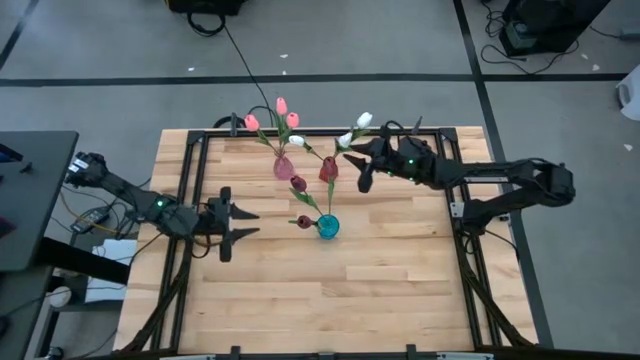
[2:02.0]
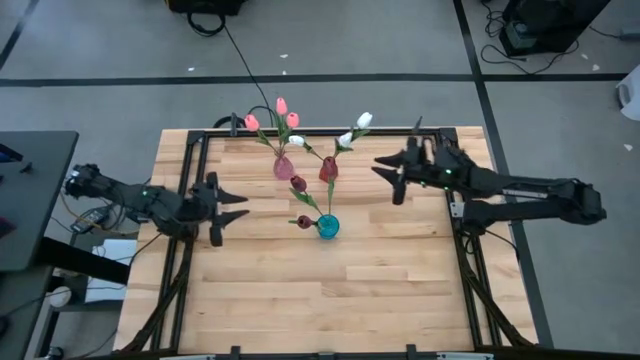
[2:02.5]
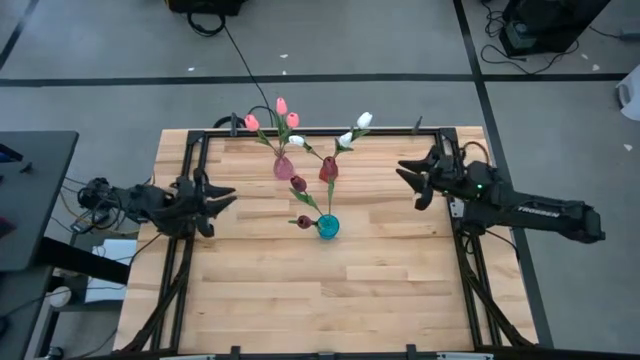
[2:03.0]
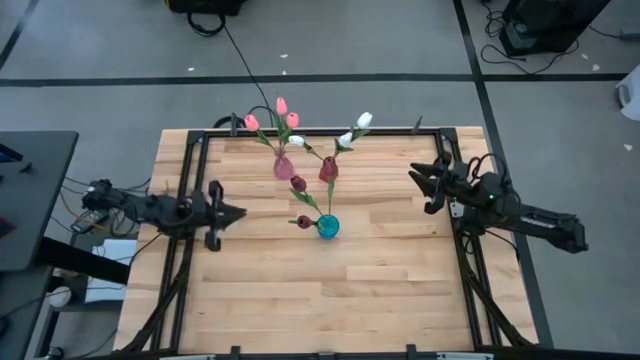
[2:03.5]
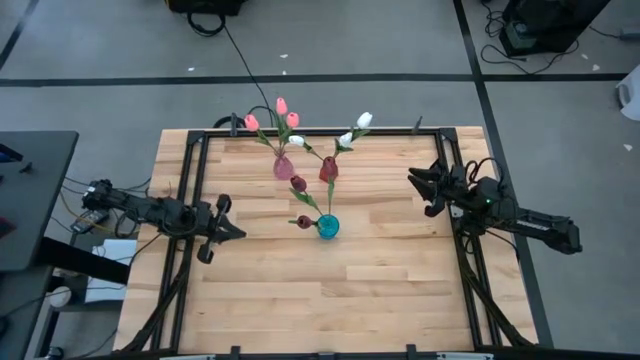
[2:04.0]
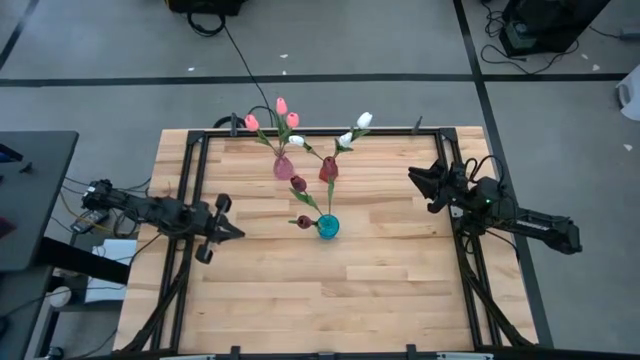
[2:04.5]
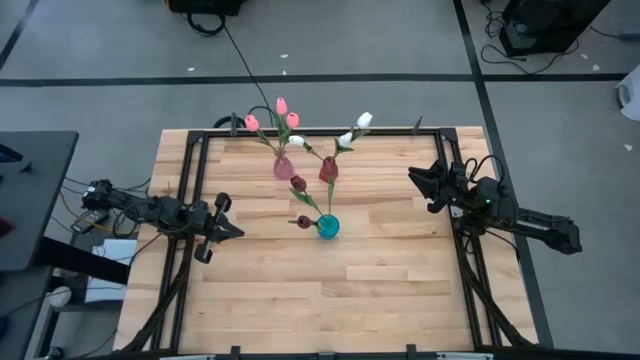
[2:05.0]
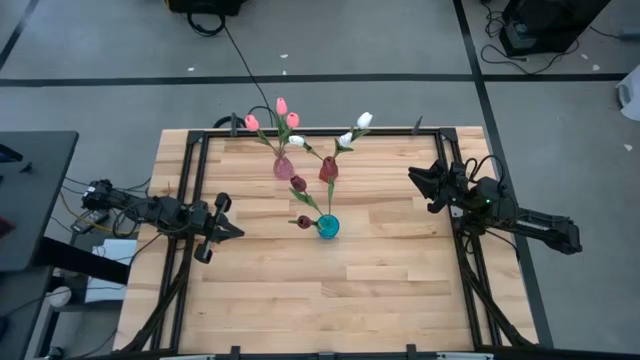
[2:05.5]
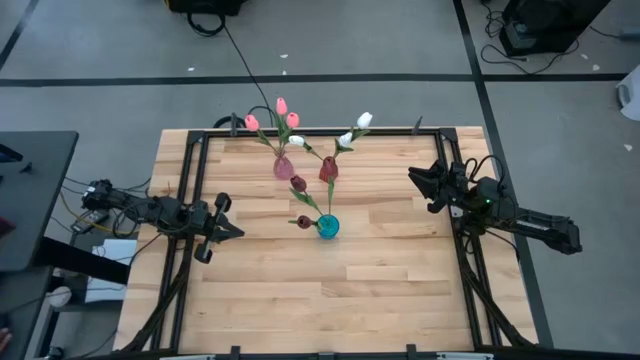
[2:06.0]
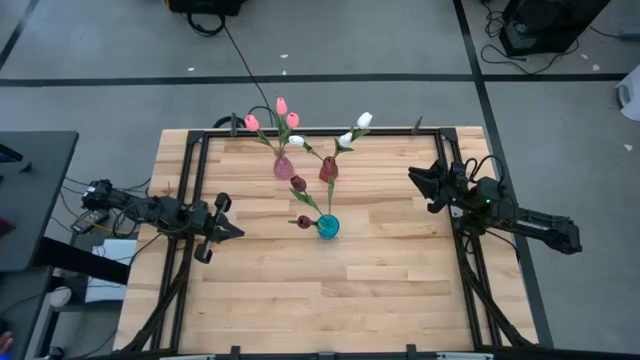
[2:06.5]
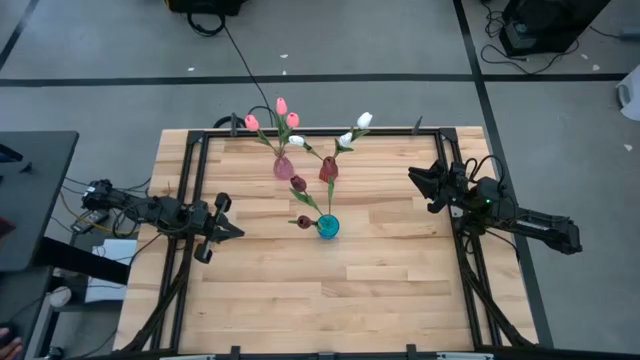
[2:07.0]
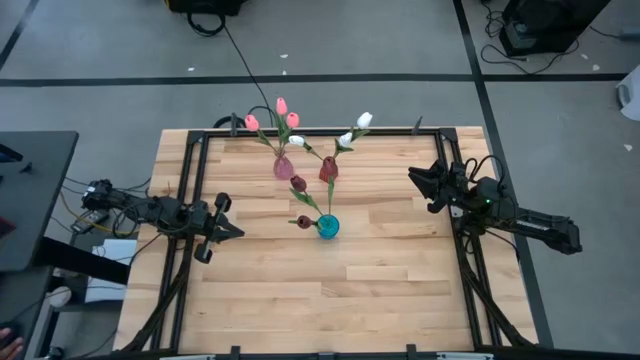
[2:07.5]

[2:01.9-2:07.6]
Task: Sort flowers into vase by color
Return to Home Position

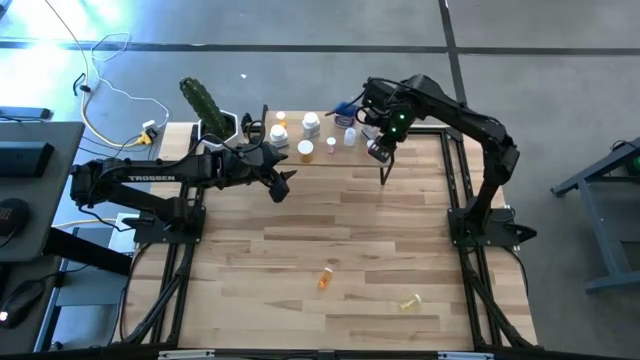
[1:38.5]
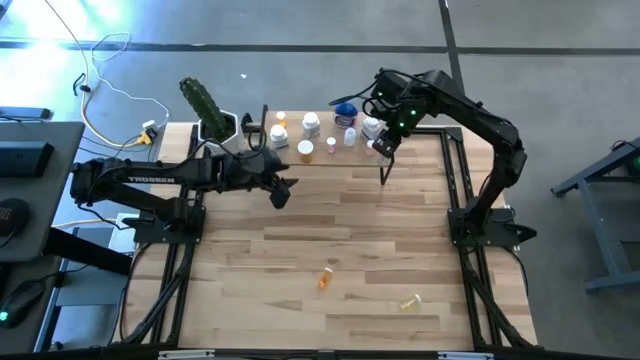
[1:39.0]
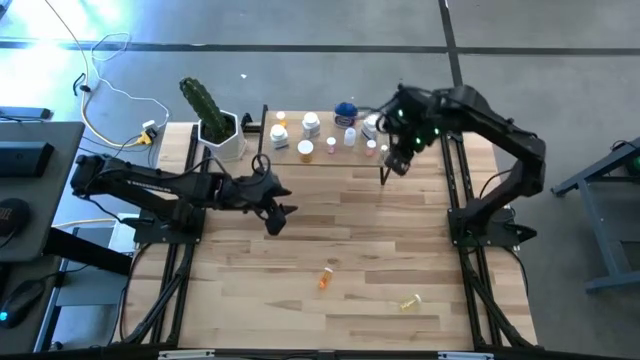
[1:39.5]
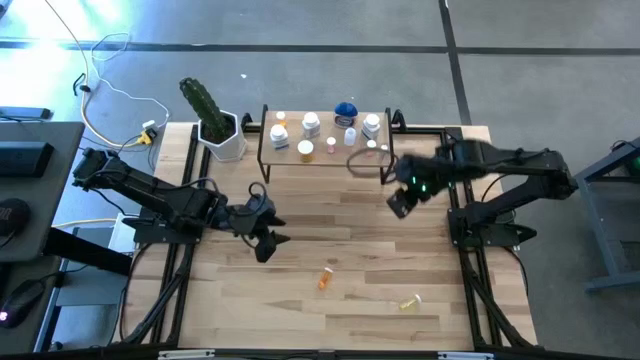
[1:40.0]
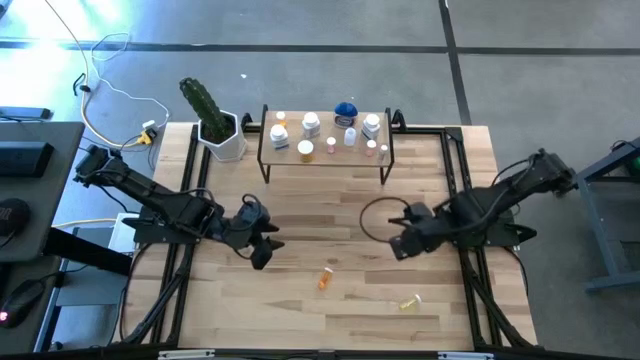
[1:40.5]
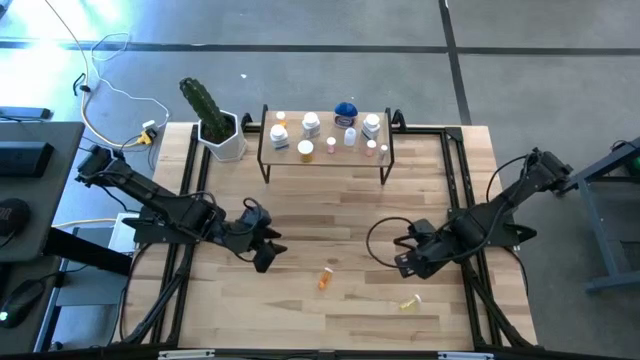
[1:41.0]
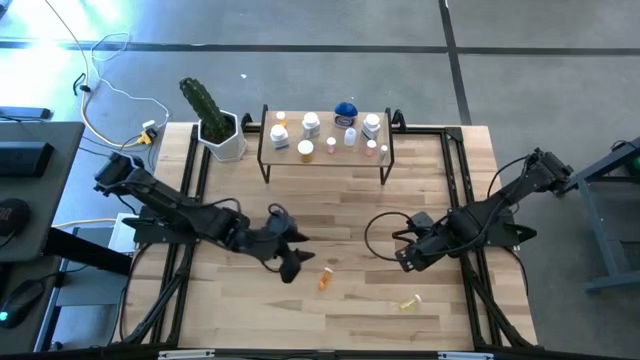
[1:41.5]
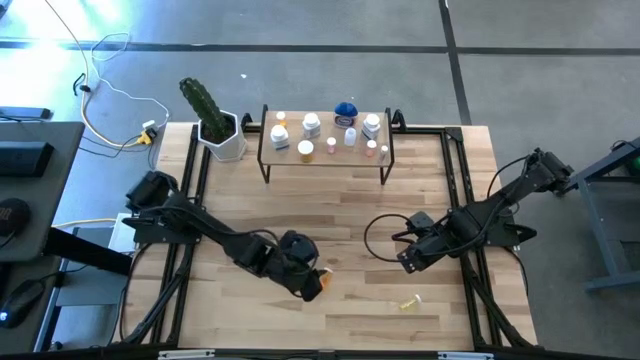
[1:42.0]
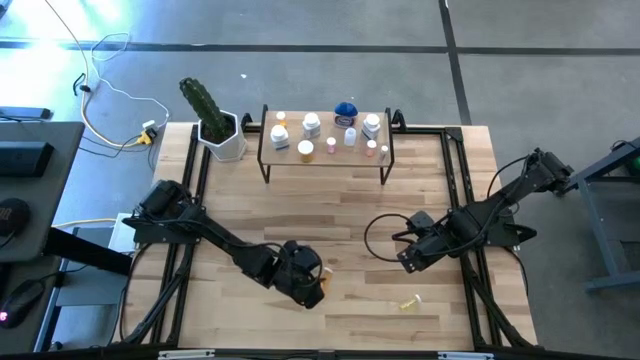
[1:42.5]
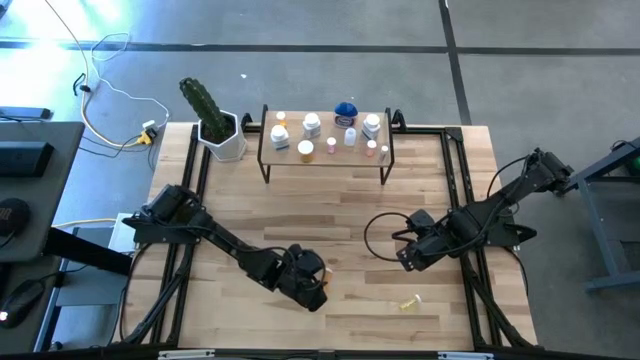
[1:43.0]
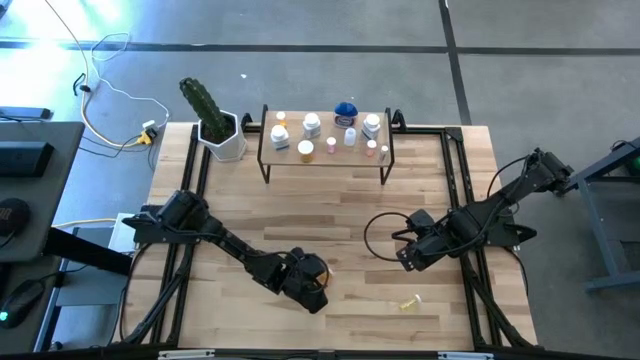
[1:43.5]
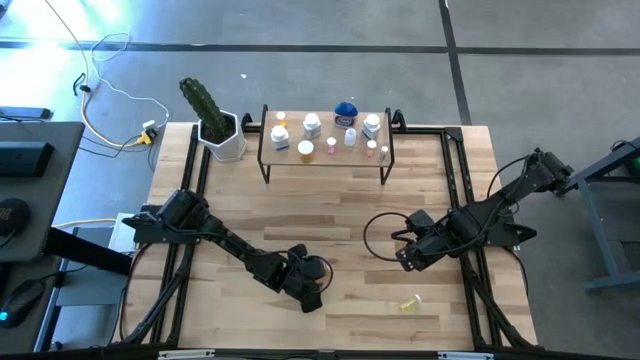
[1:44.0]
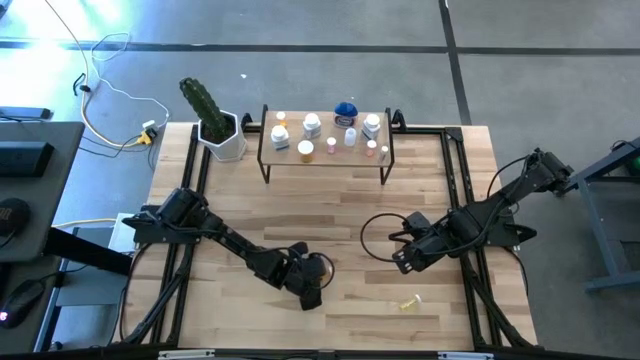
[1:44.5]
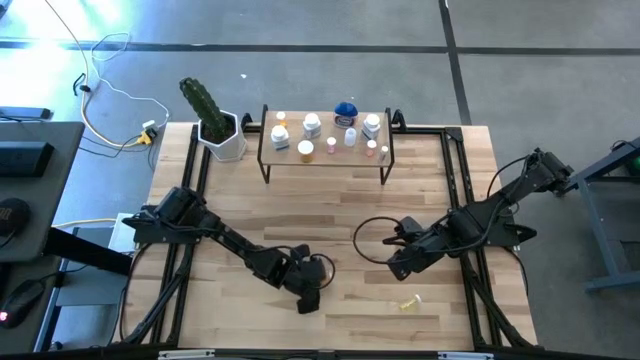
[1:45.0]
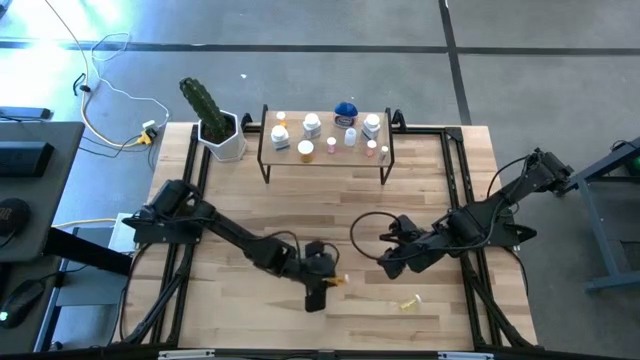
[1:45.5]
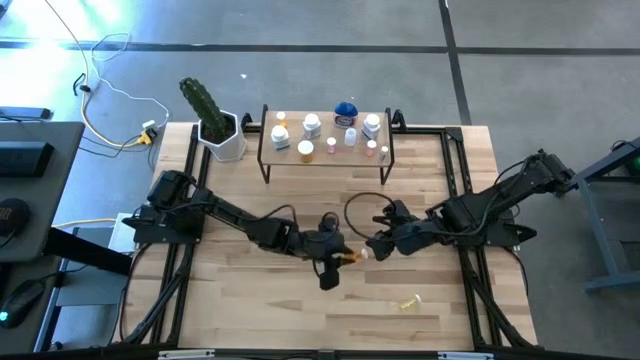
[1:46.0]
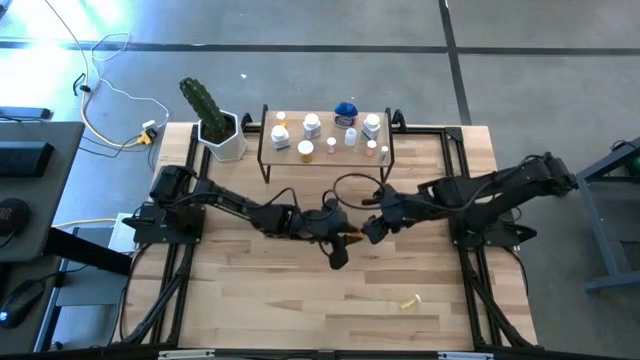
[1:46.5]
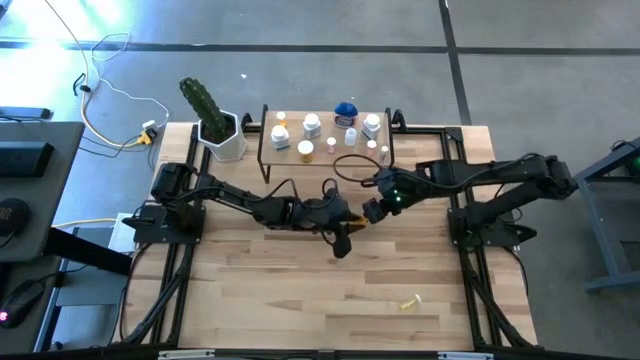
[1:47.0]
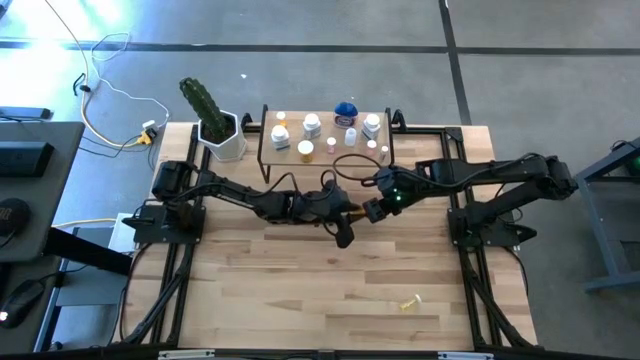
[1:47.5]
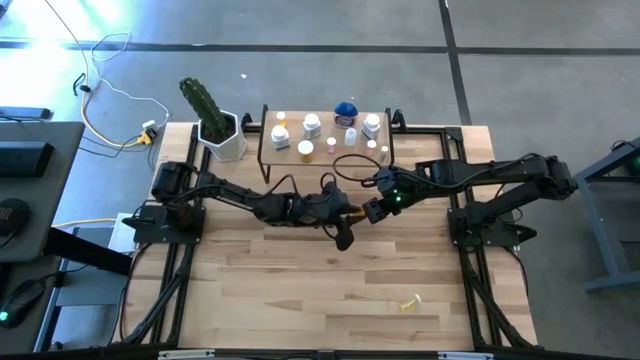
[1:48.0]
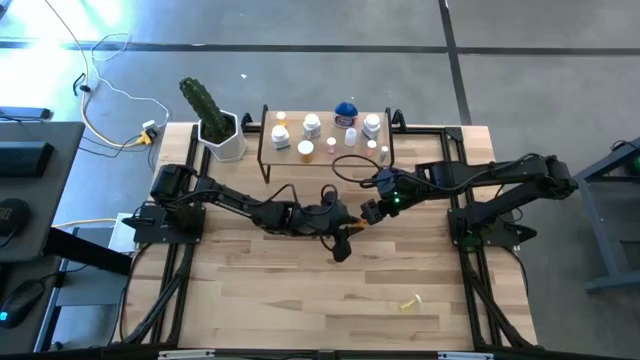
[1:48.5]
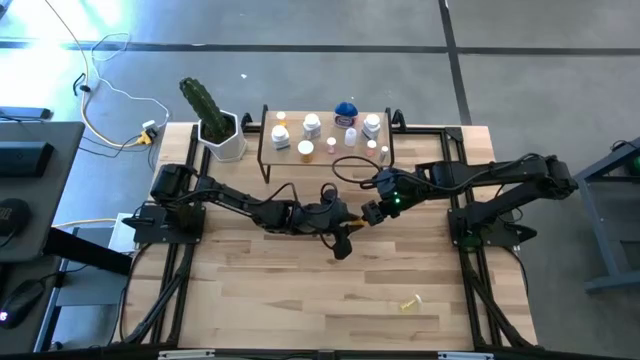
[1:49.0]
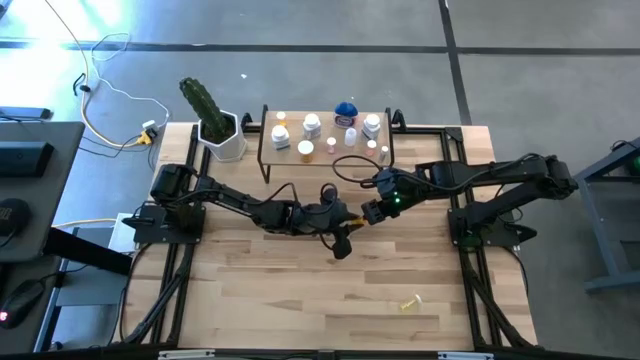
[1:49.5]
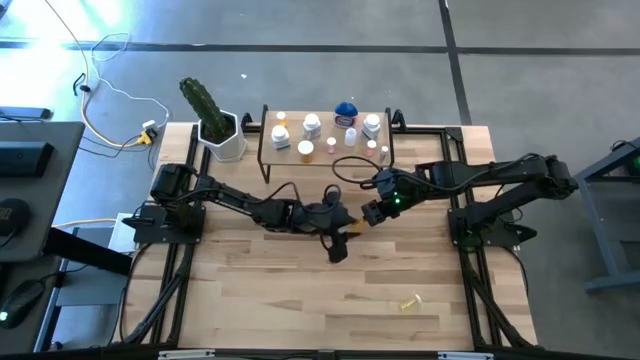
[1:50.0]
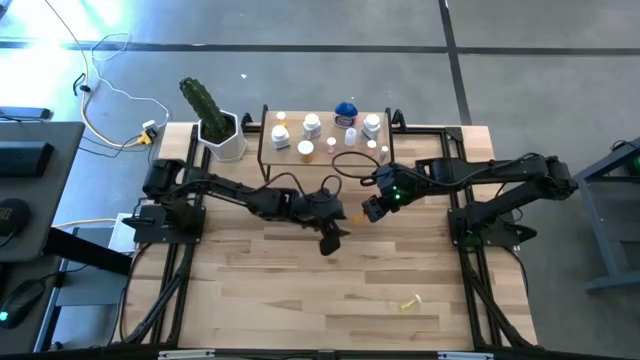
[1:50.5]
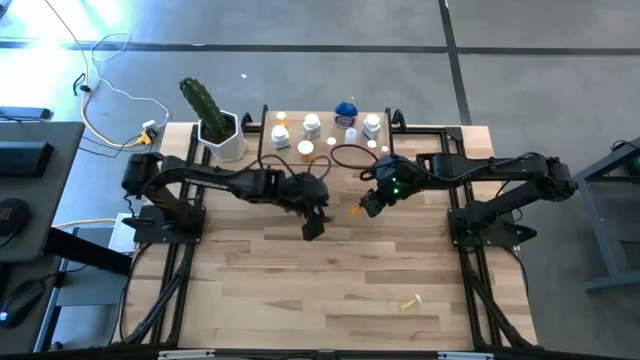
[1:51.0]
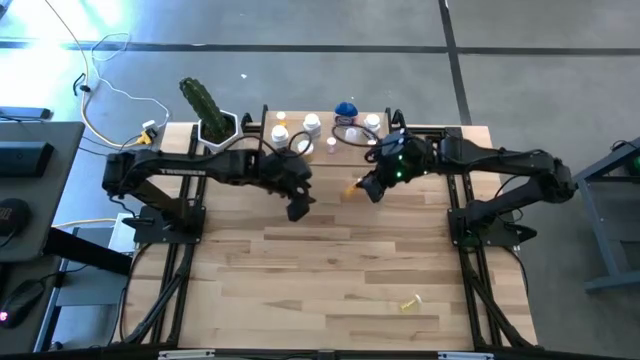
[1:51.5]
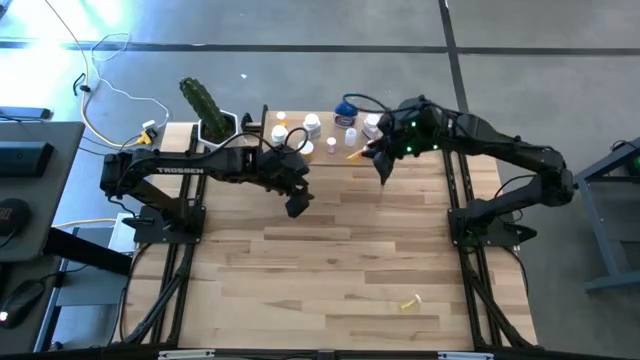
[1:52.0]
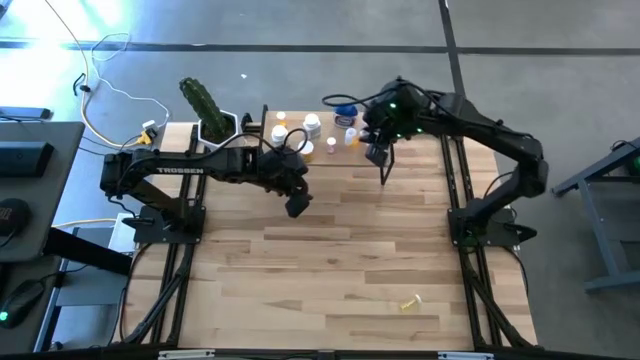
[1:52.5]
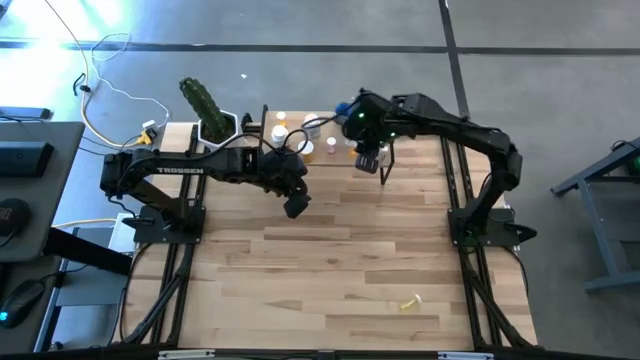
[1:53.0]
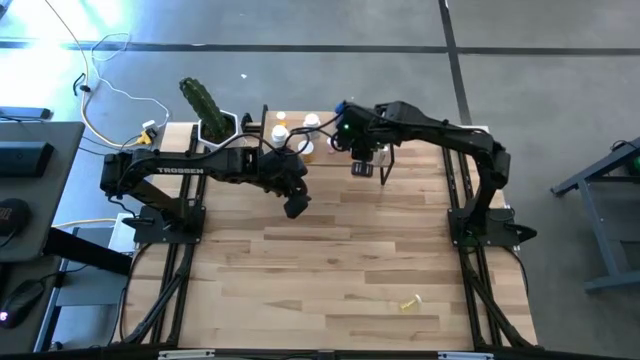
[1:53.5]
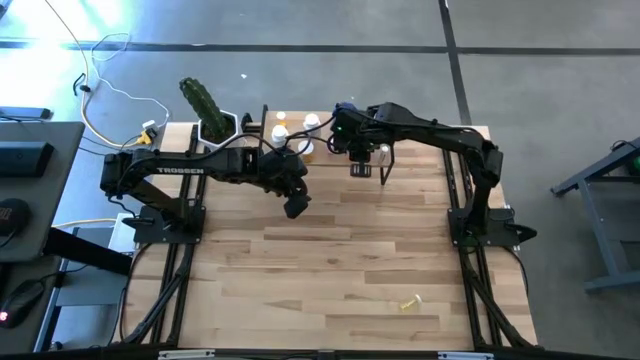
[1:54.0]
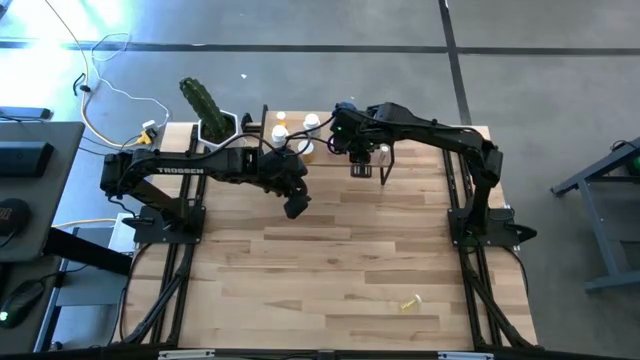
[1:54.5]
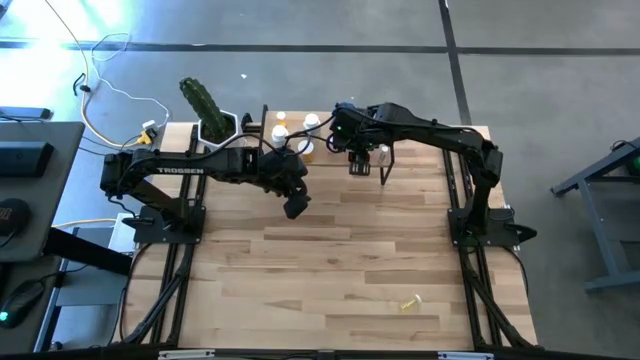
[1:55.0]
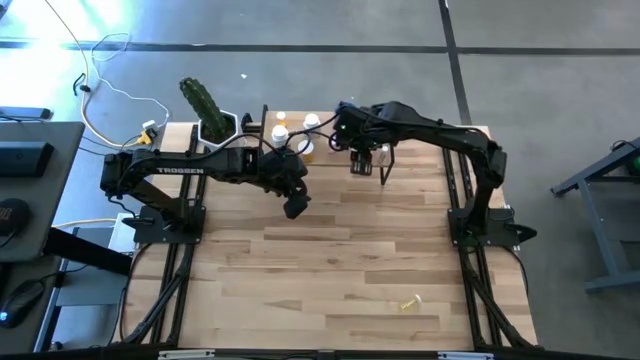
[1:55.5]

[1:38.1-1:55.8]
Task: Pick and place medicine bottles onto shelf by color
Put the orange pill bottle on the shelf
